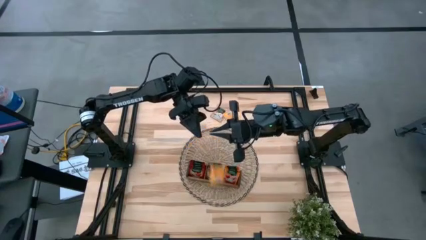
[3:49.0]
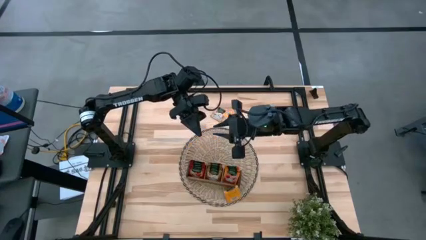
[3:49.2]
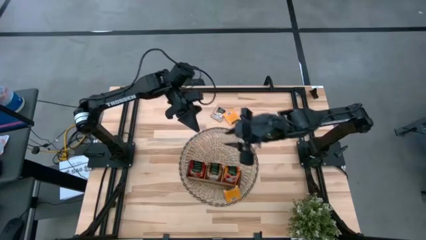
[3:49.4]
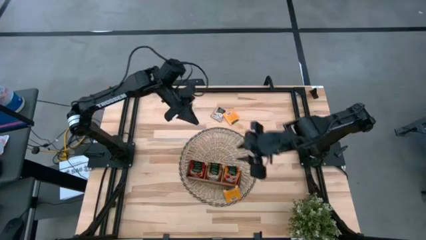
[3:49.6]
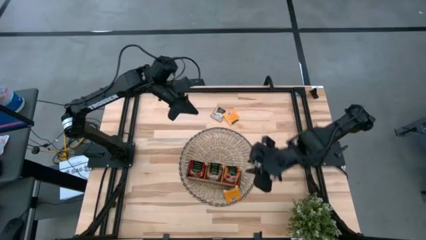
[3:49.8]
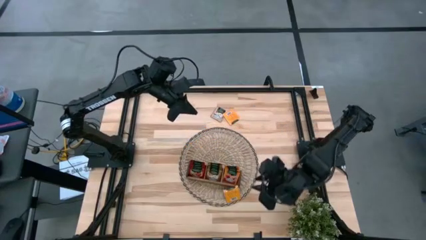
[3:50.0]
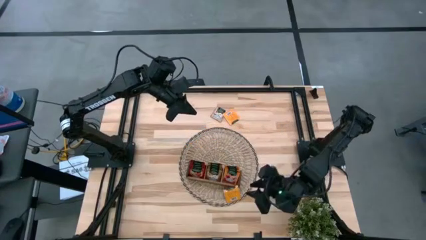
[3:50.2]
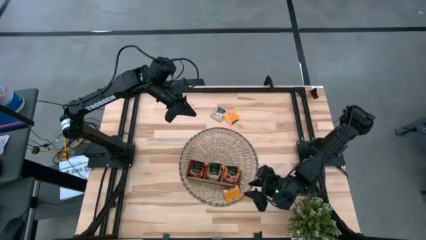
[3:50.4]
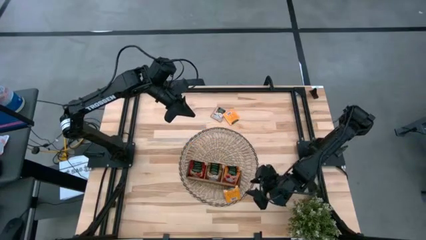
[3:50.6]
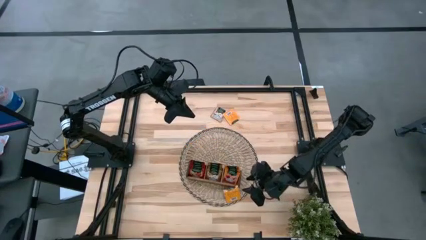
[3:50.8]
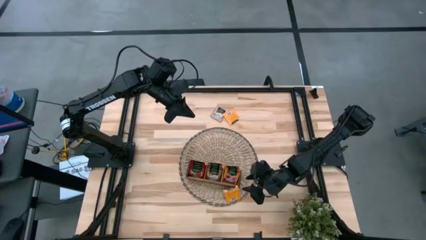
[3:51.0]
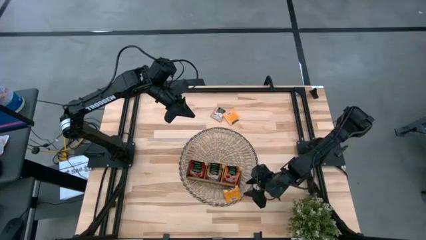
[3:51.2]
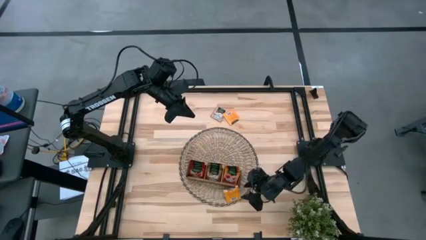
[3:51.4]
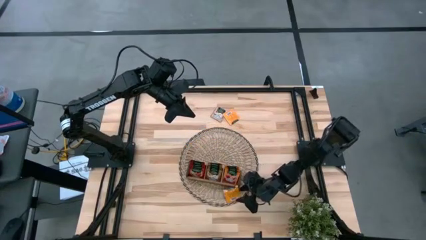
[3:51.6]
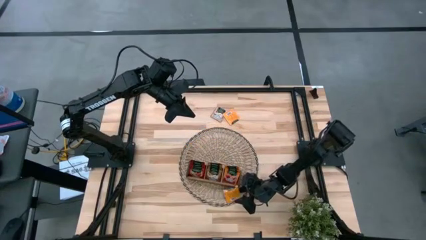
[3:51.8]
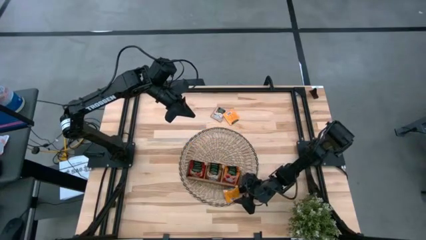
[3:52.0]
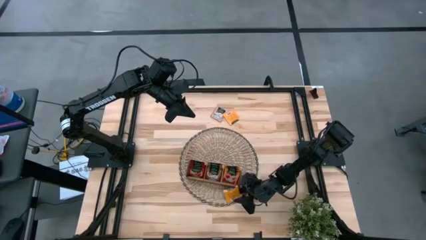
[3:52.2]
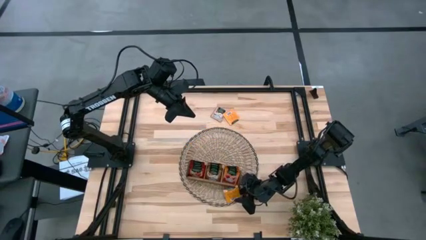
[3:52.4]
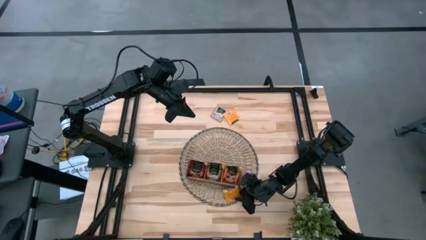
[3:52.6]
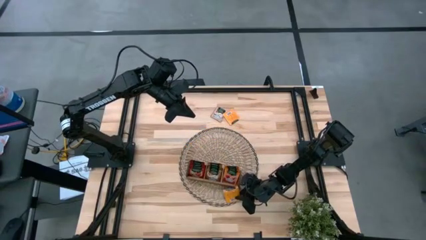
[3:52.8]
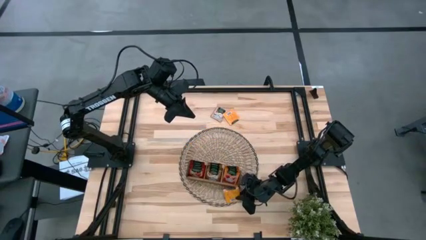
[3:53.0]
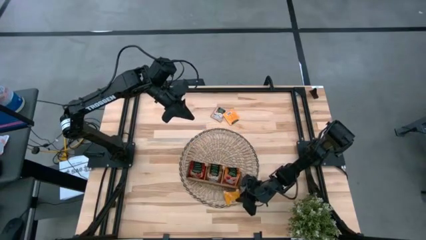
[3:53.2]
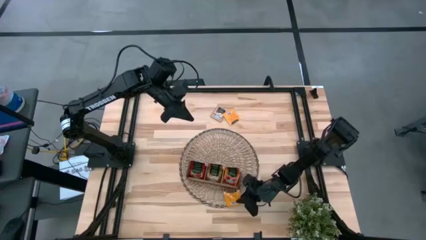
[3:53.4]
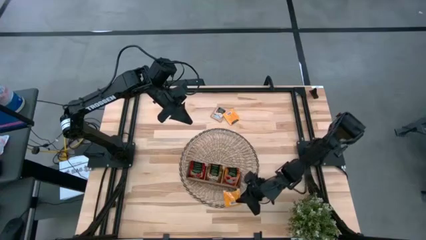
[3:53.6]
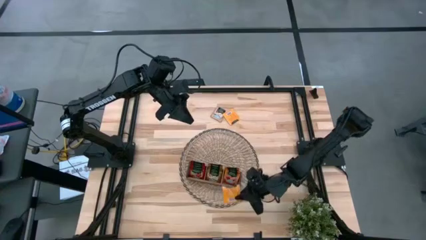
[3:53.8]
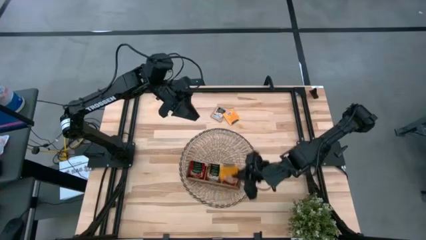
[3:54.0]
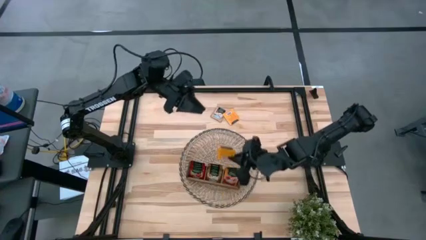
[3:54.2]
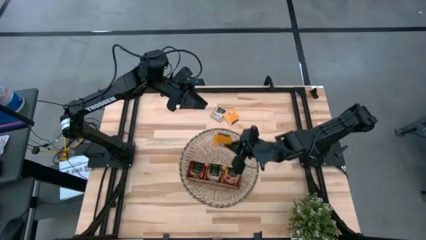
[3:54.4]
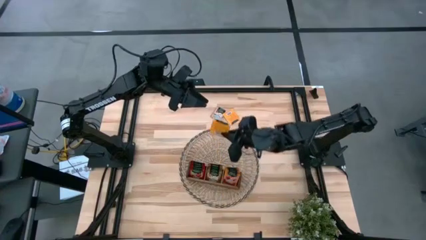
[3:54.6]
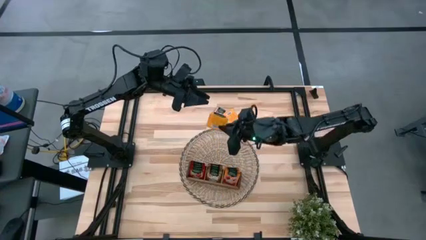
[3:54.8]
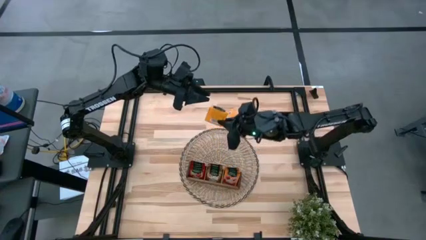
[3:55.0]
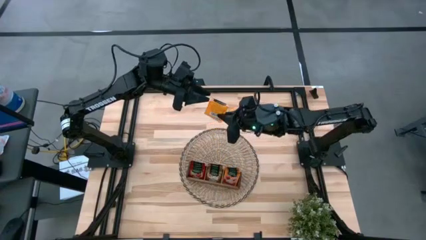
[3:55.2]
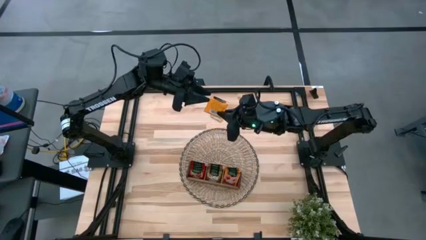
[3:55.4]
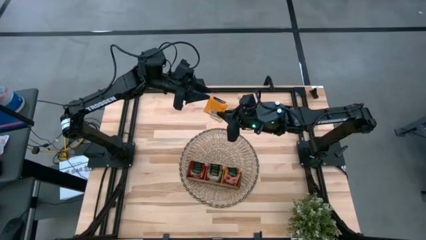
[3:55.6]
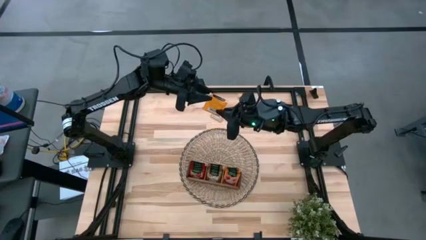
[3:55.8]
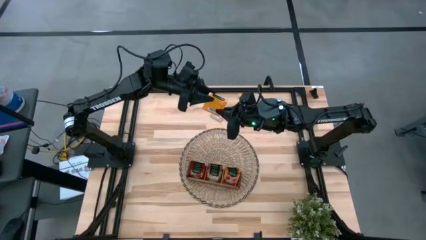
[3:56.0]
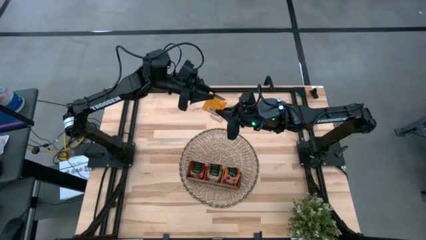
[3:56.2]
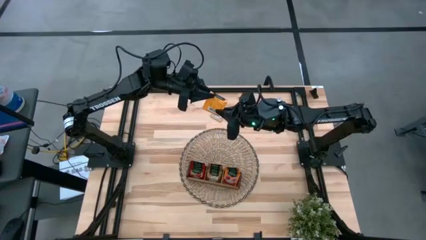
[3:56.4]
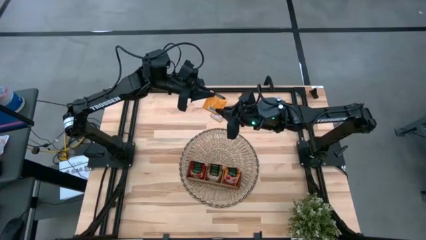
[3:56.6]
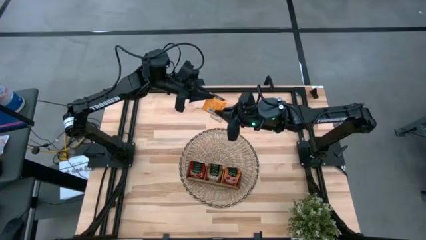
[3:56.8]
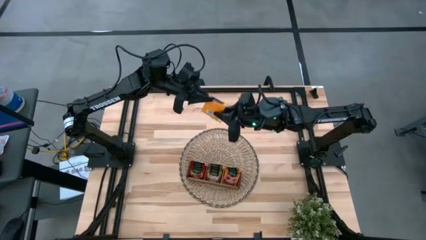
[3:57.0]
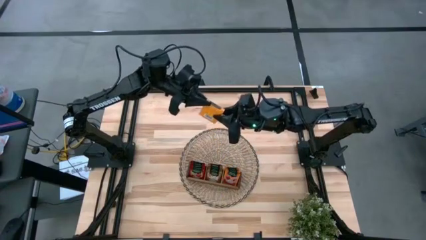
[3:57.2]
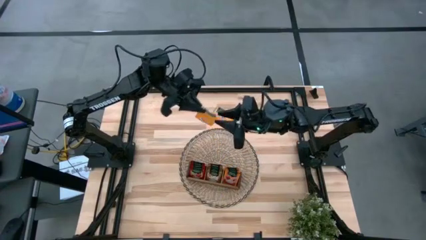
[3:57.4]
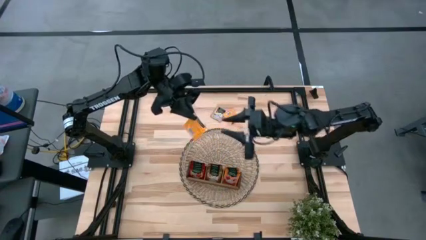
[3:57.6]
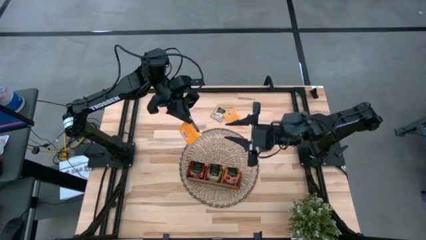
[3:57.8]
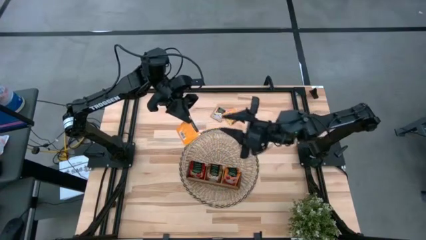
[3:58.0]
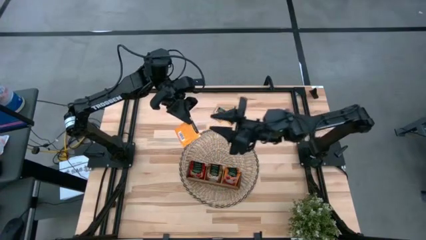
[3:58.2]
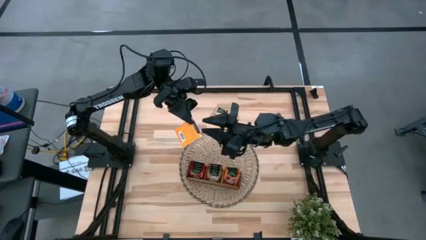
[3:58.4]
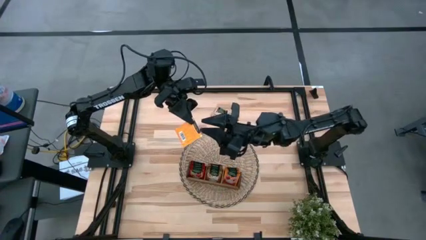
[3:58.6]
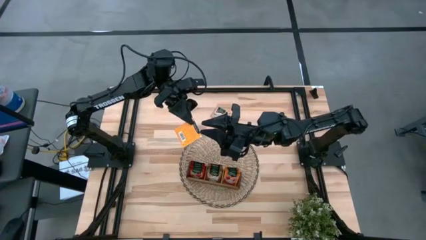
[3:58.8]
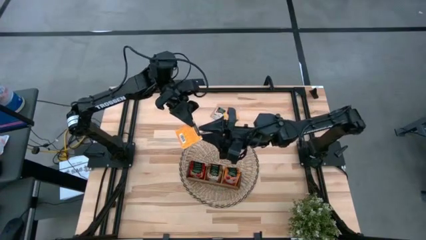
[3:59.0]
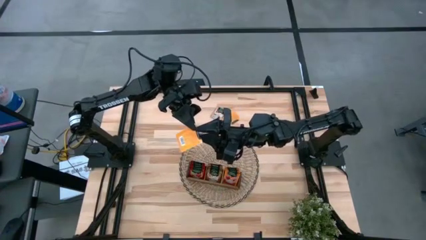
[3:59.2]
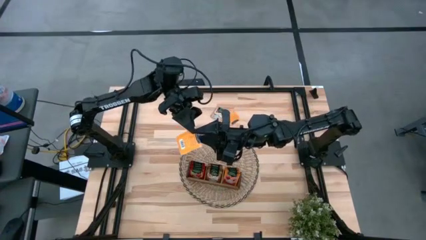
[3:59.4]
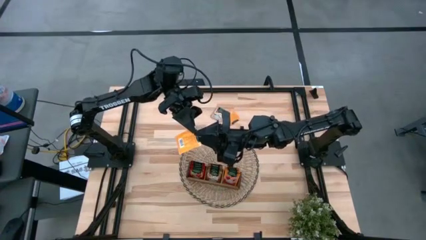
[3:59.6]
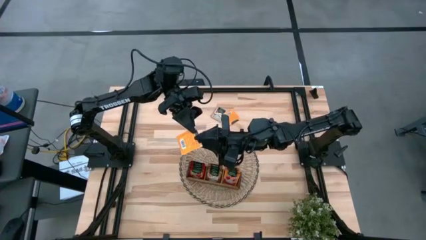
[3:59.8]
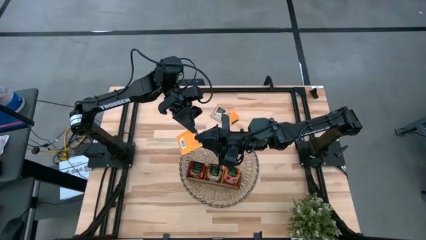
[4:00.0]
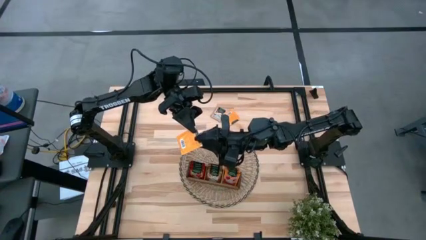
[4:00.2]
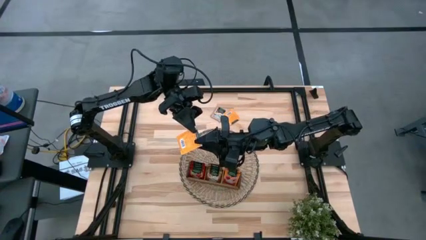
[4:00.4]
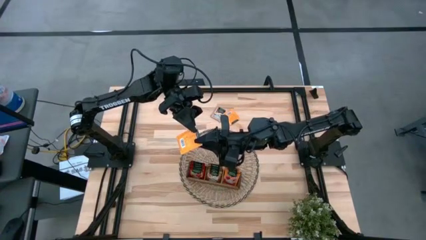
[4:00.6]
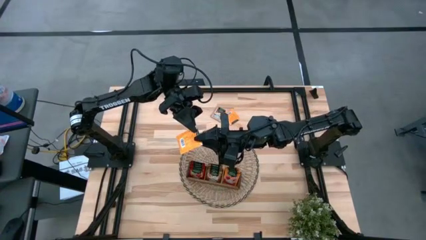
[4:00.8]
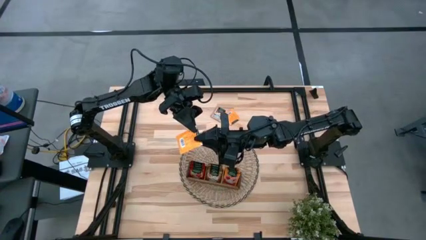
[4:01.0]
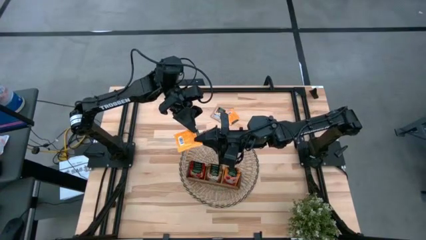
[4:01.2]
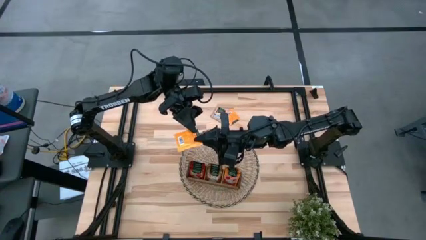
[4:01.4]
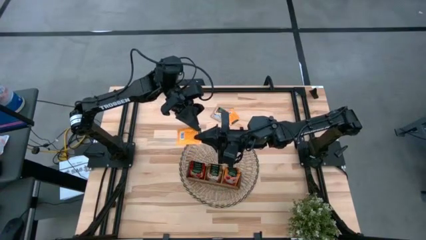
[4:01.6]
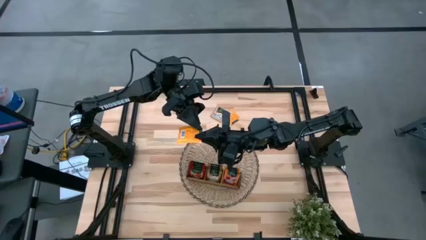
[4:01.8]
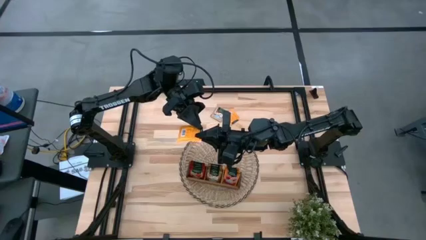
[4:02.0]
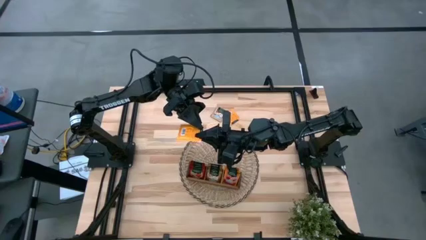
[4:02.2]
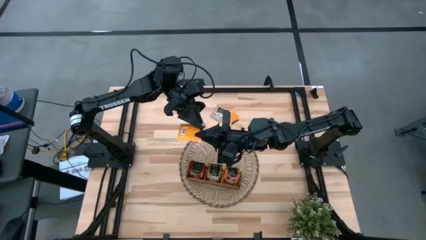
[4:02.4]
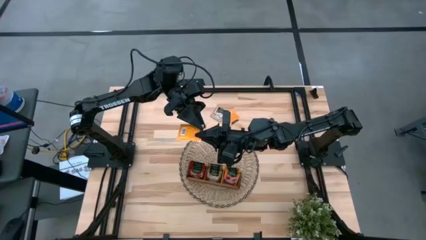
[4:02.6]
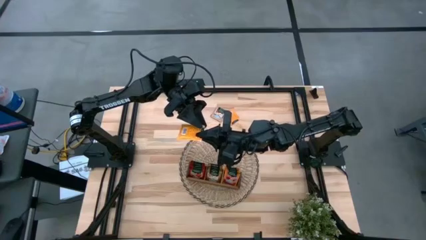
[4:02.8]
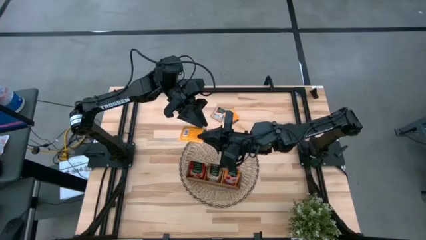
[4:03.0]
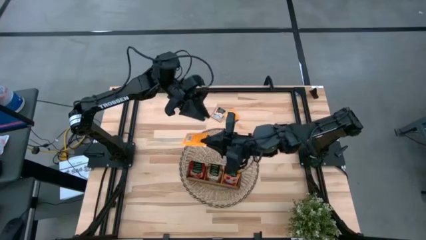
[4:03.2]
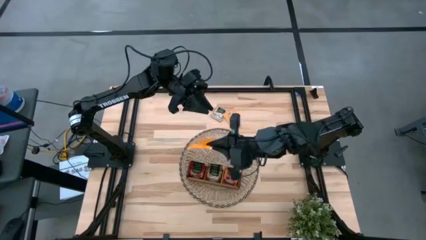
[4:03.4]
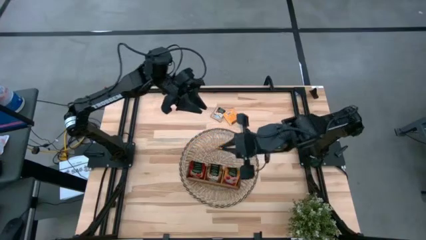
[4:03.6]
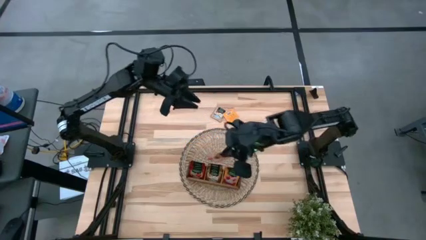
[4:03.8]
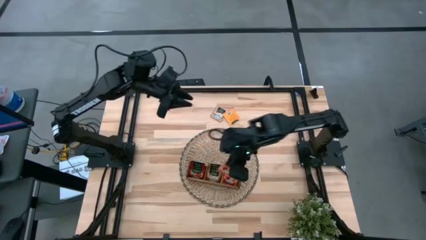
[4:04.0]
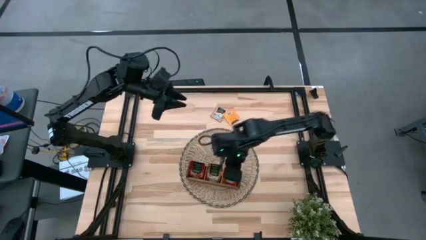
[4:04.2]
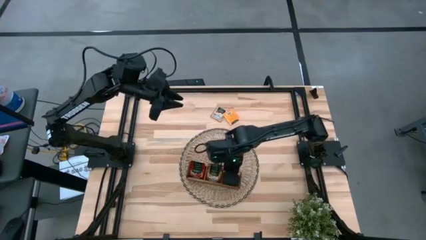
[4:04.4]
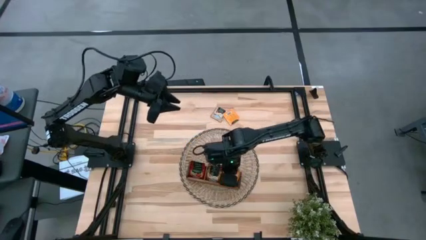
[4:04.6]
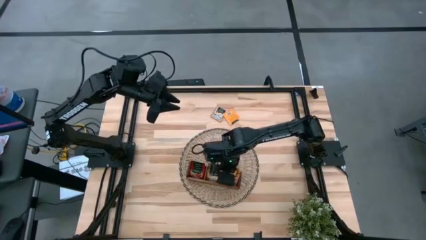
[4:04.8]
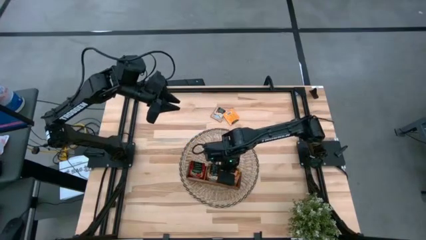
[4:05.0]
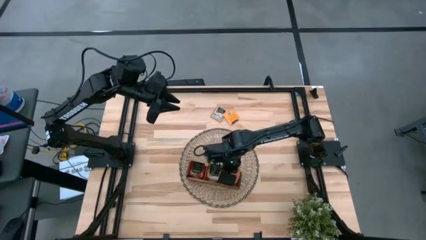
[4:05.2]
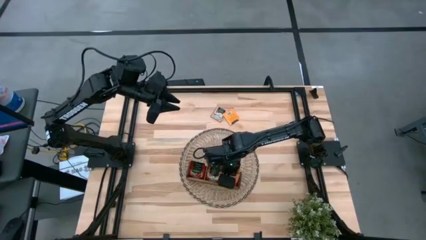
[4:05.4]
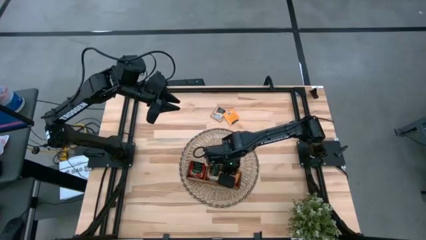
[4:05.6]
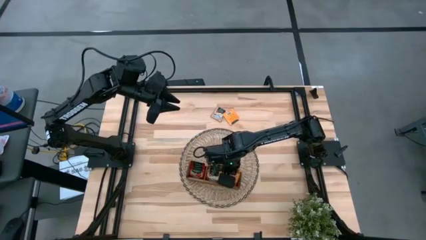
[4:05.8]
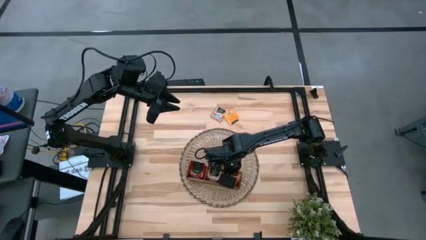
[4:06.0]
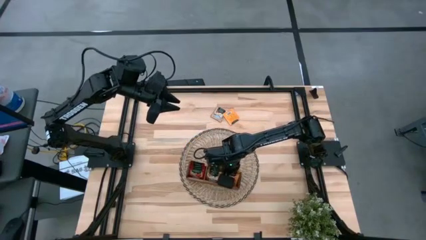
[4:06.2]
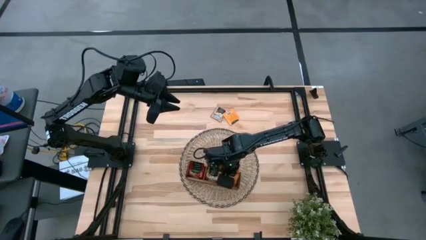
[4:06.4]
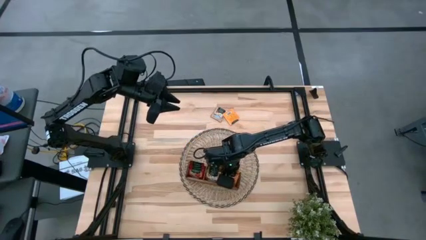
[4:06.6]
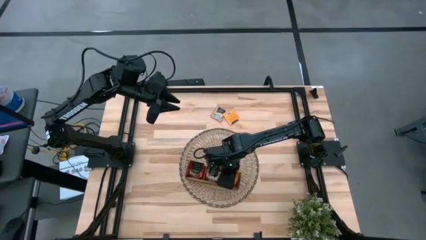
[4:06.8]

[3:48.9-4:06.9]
Task: Pick & Place Tea
Put the orange tea bag into the right section of the wooden organizer
